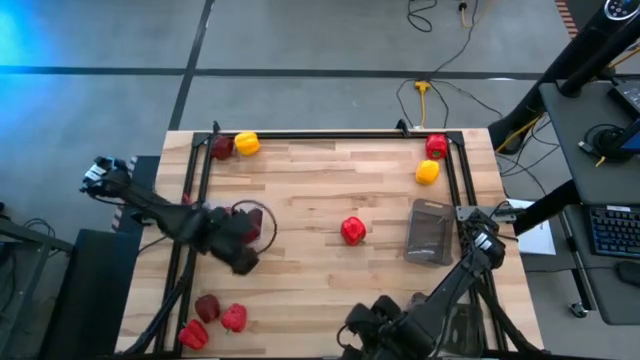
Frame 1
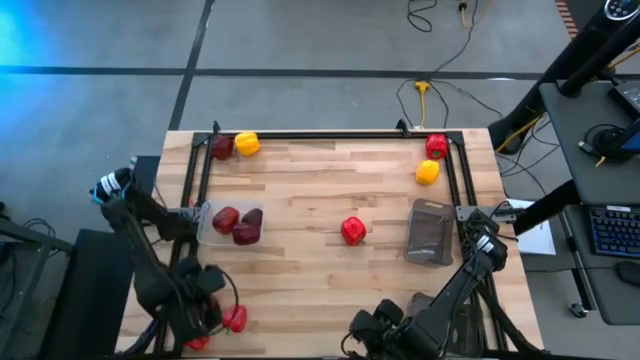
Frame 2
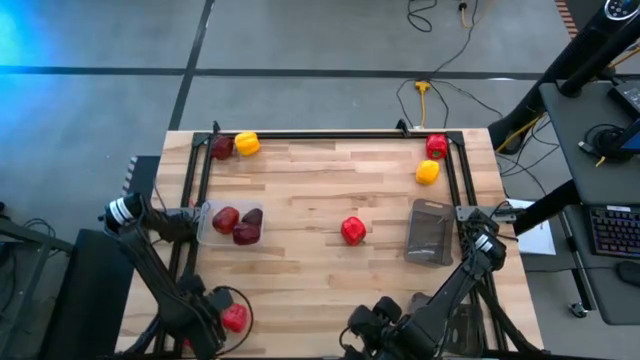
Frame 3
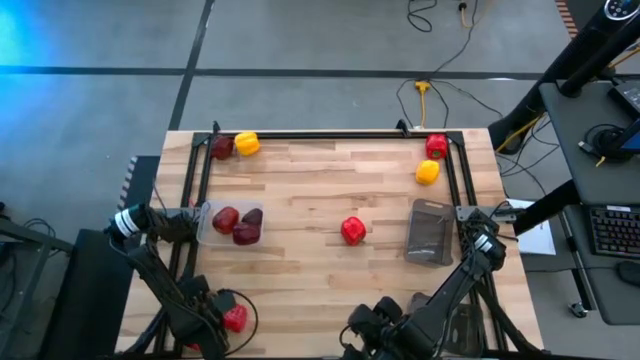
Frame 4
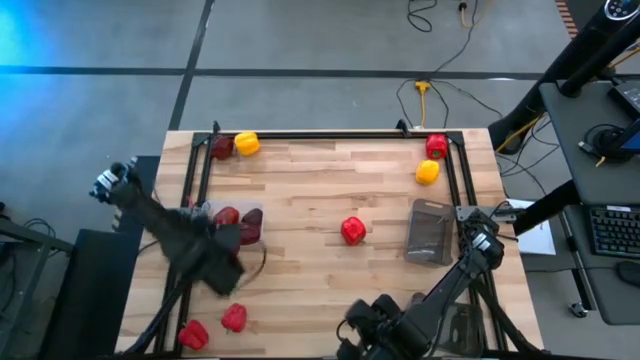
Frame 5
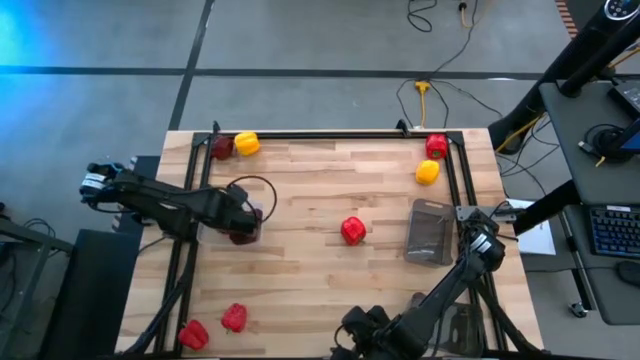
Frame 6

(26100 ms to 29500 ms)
Task: Sort produce into baskets
Put the bottom red apple in the transparent bin

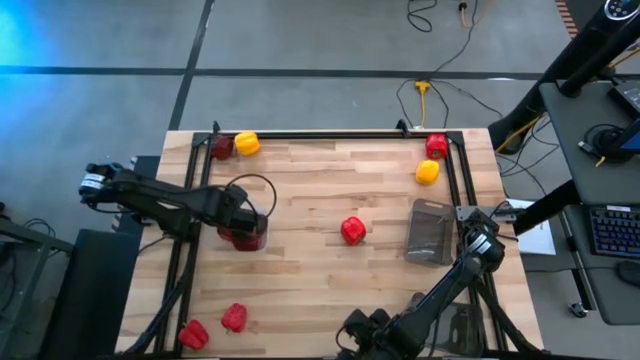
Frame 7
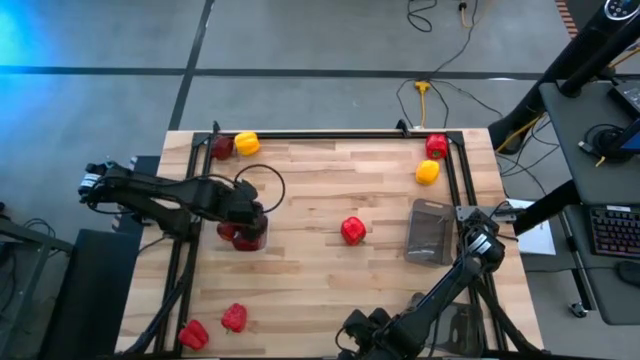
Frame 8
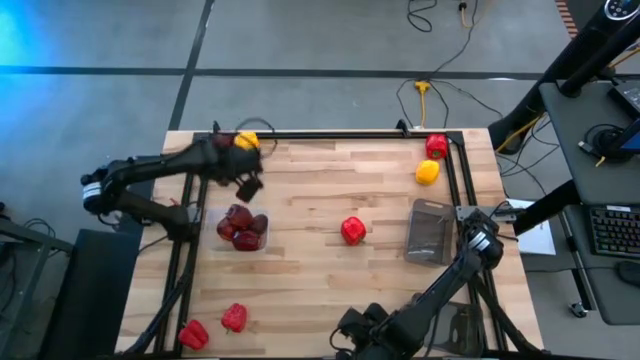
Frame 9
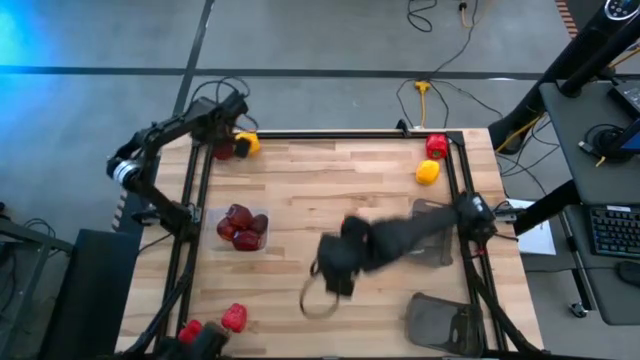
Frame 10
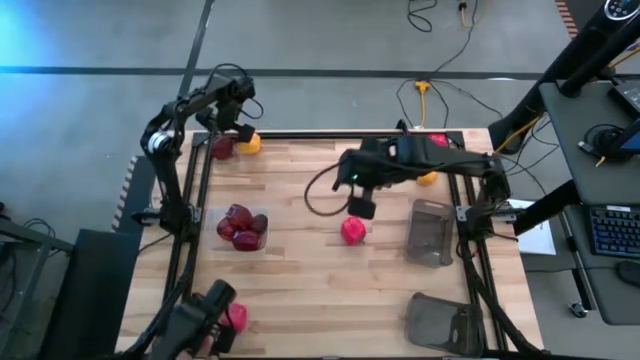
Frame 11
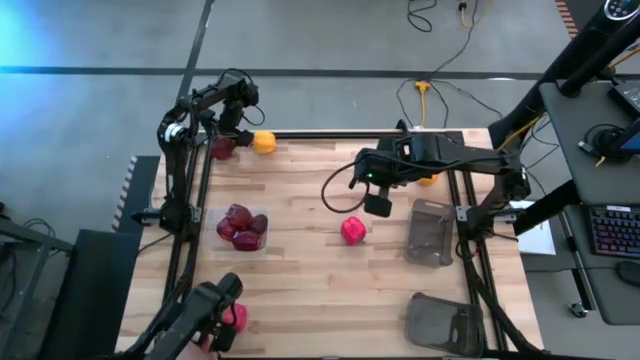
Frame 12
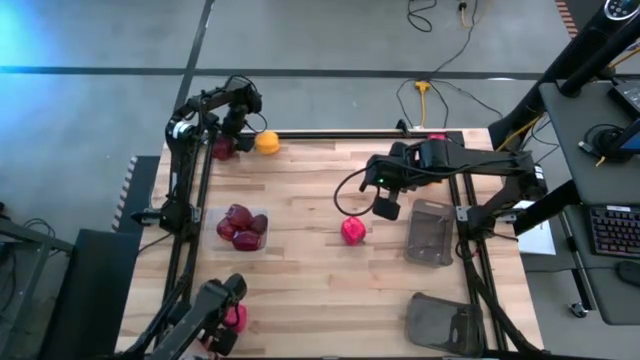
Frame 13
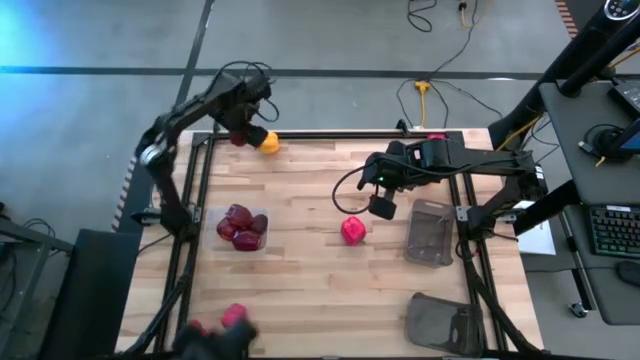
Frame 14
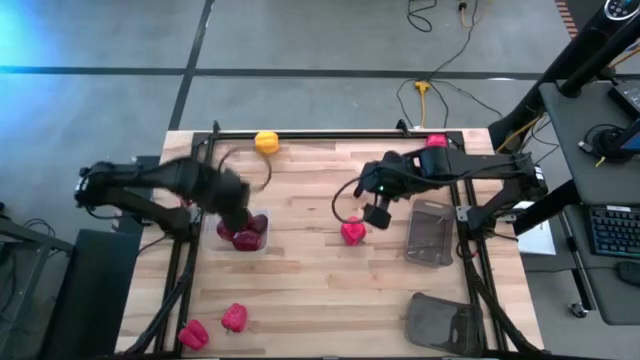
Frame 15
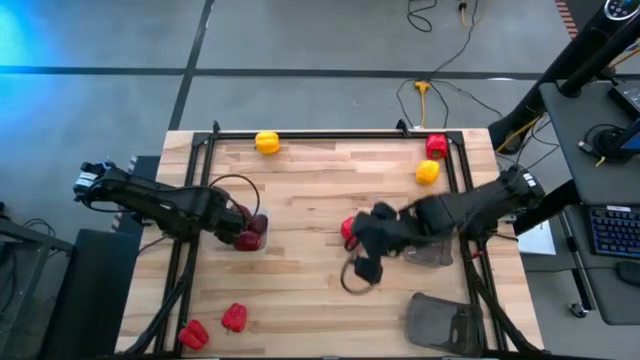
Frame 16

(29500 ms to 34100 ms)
Put the red apple in the transparent bin

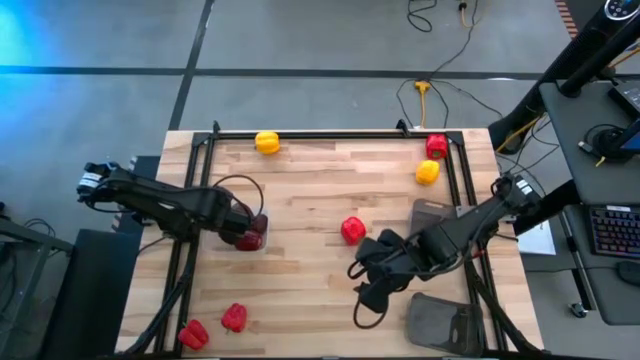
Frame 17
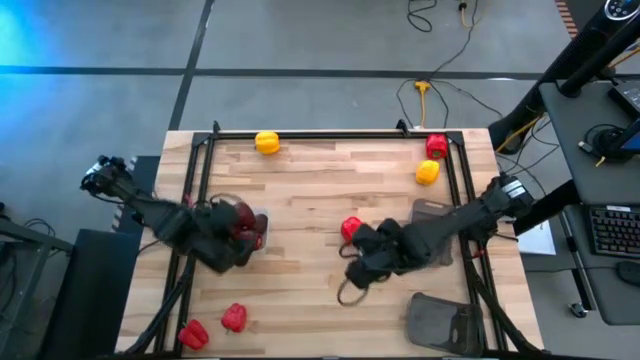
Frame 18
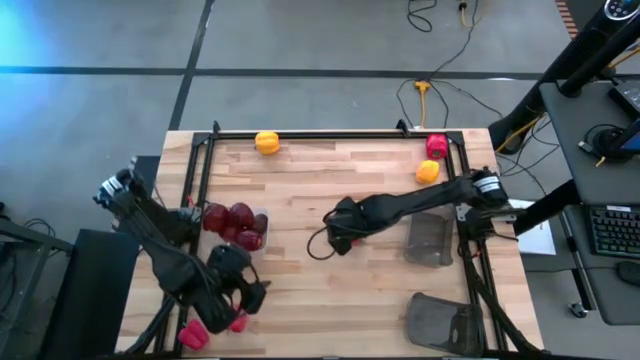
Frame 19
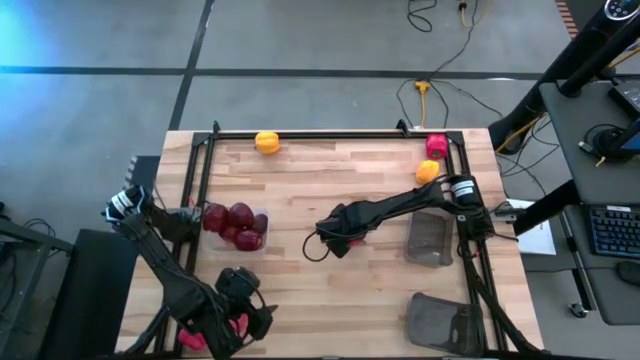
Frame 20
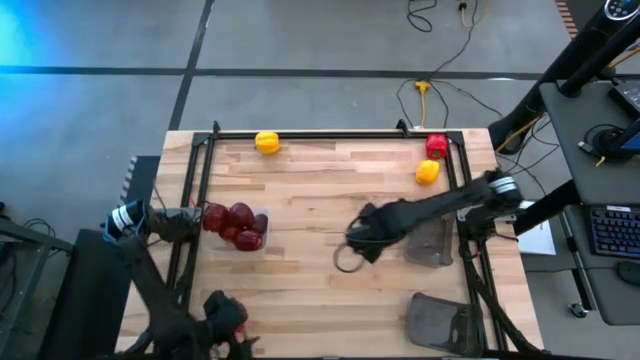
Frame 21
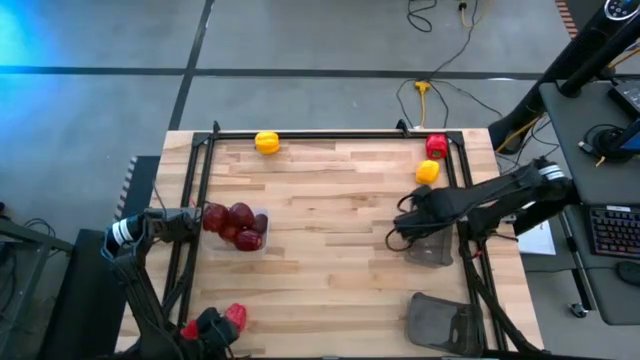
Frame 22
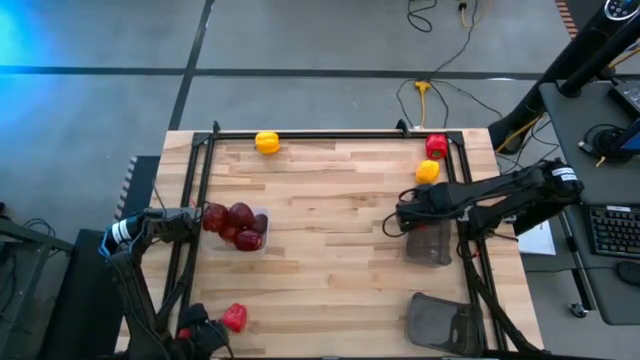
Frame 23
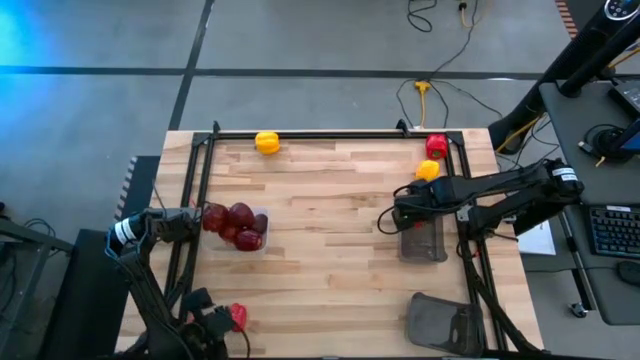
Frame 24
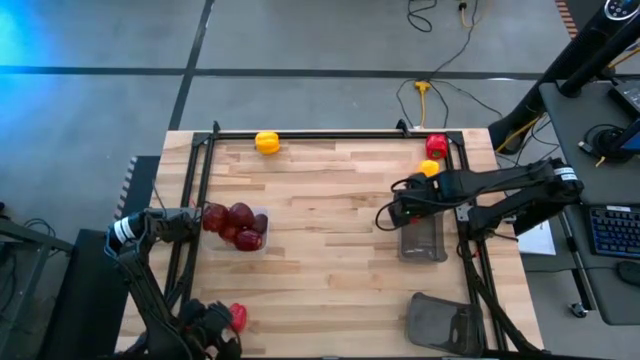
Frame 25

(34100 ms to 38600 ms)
Put the center red bell pepper in the top black bin

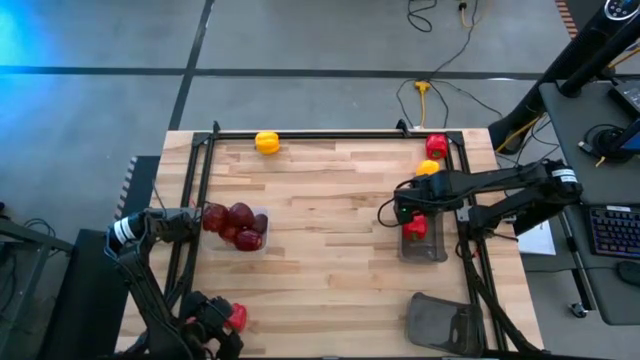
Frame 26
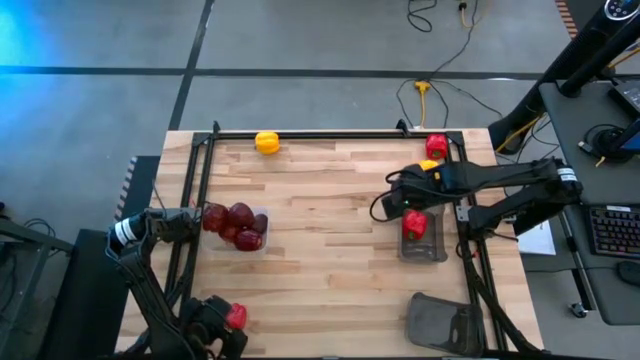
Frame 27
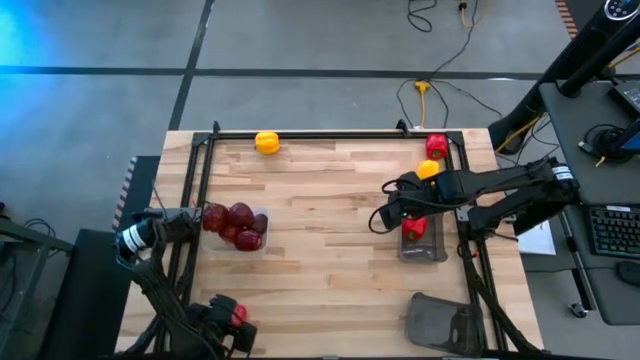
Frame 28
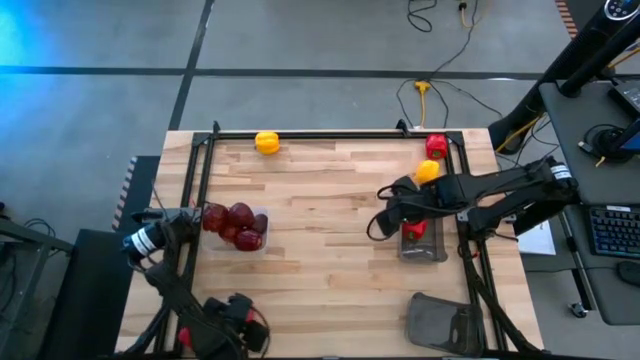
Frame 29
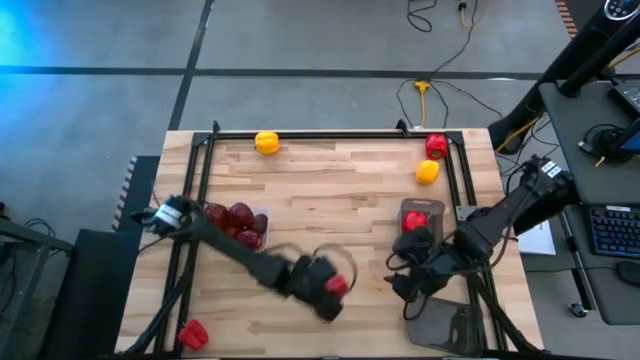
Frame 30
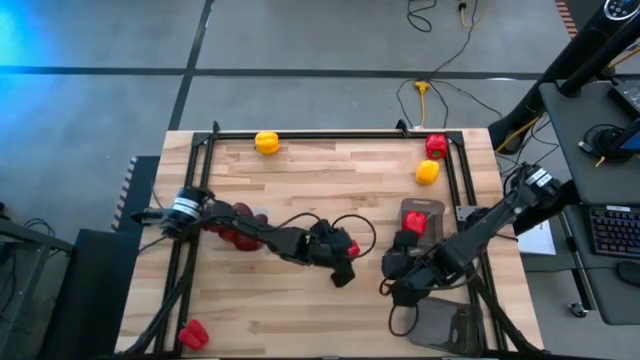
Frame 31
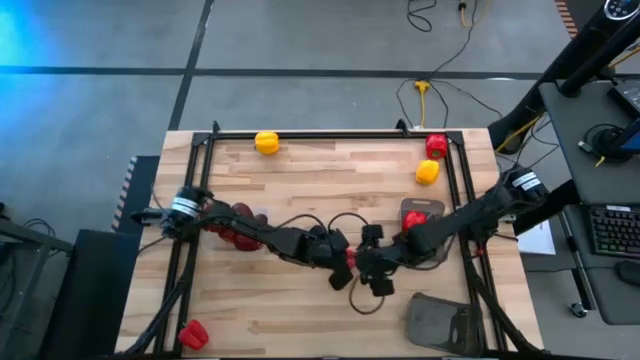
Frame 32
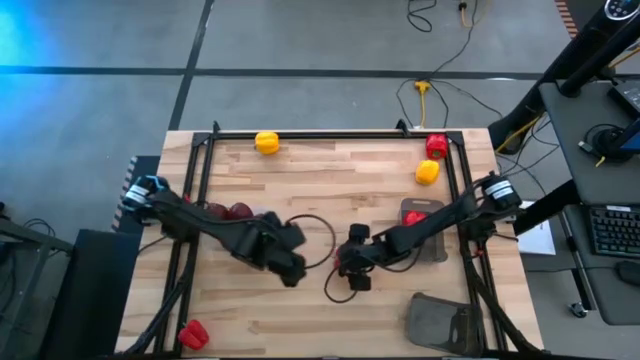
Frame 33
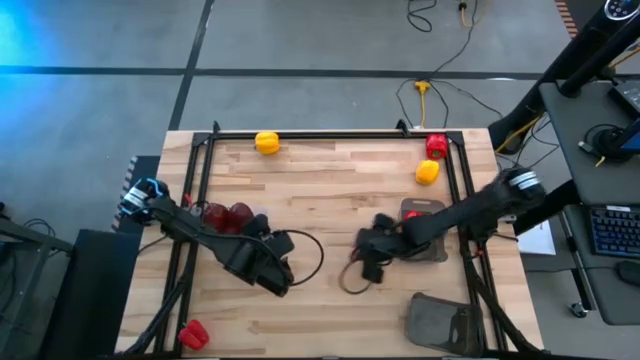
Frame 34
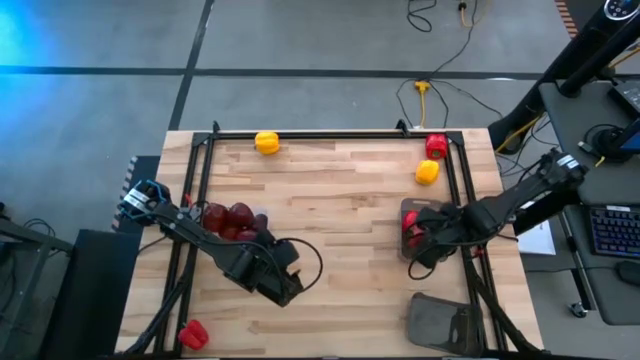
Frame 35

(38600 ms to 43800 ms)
Put the middle left red bell pepper in the top black bin

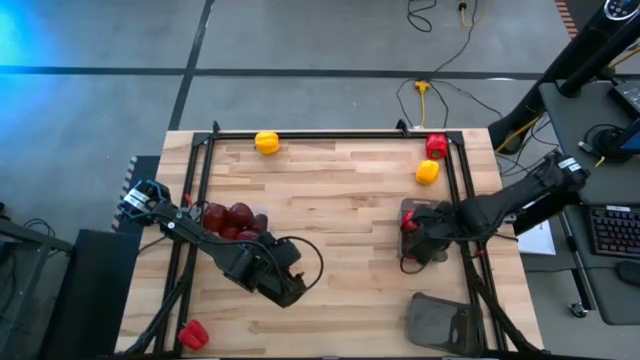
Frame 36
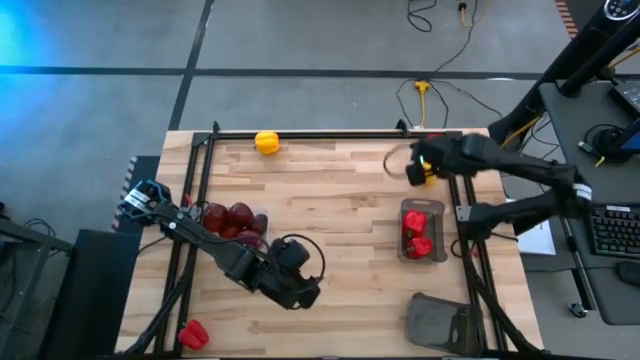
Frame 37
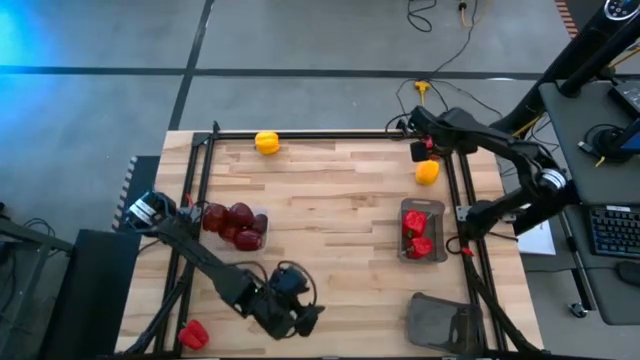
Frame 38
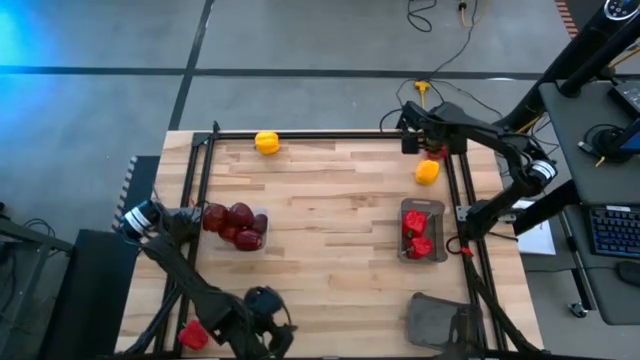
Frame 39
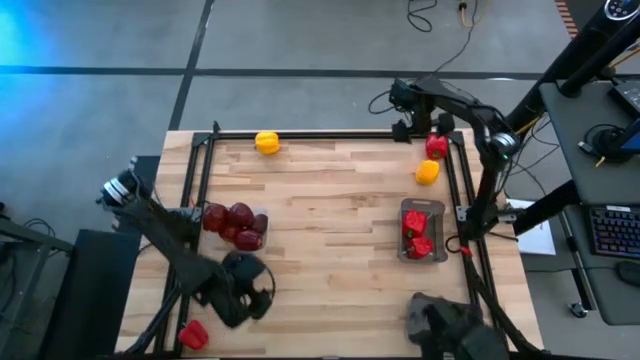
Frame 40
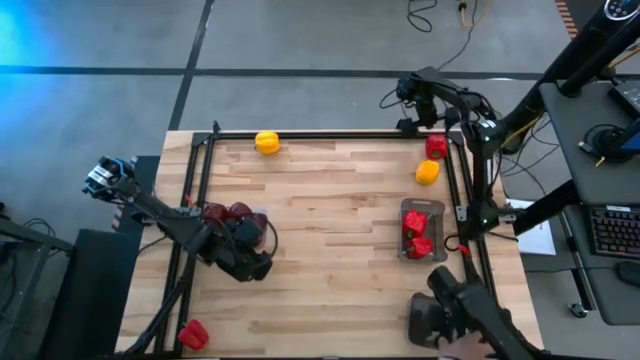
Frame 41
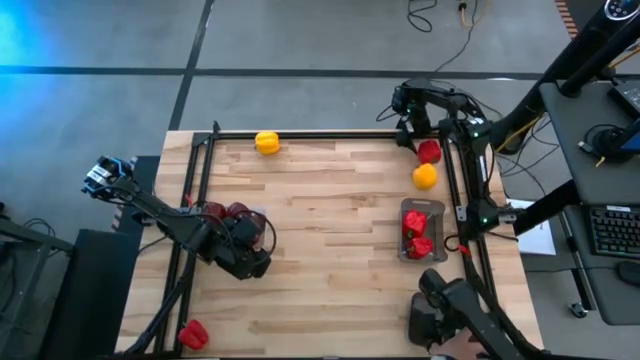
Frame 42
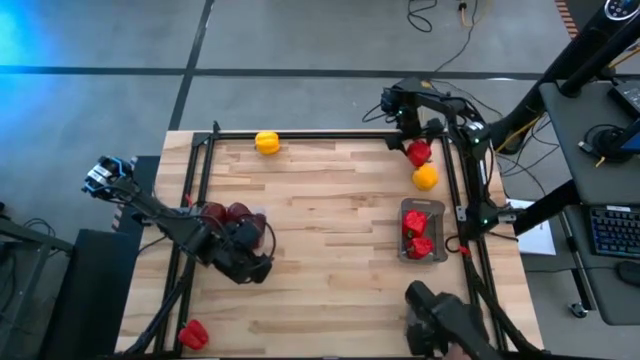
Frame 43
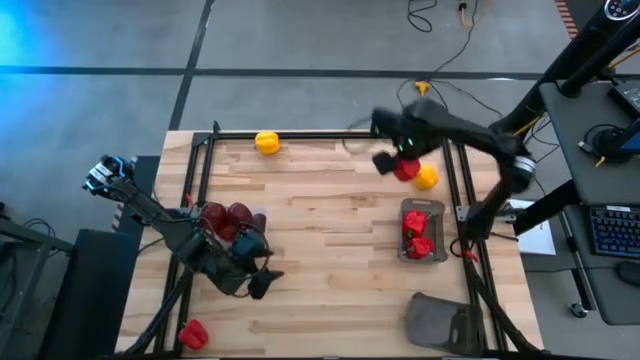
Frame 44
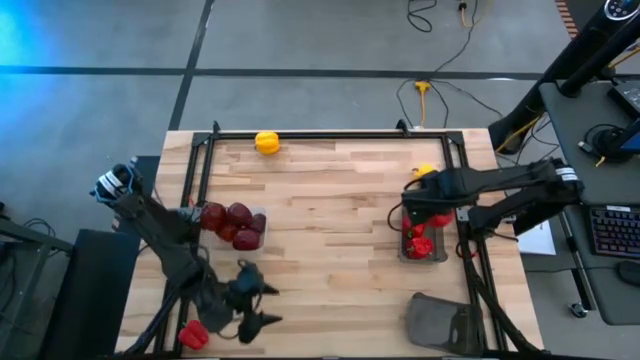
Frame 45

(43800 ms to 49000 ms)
Put the top red bell pepper in the top black bin
